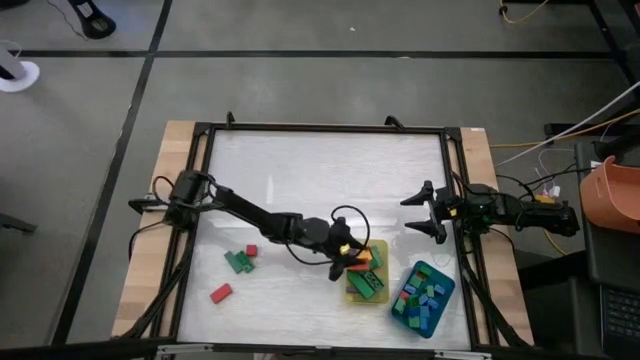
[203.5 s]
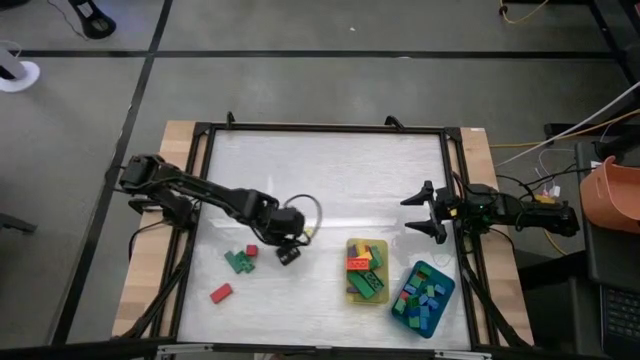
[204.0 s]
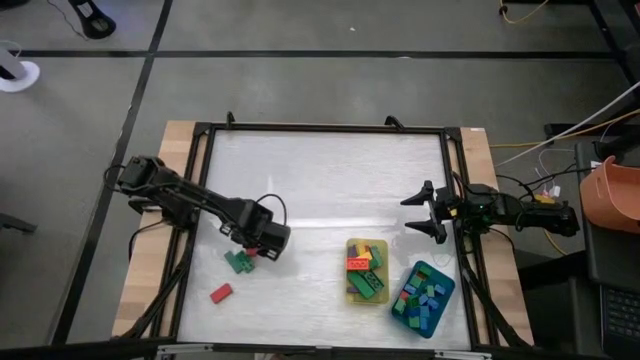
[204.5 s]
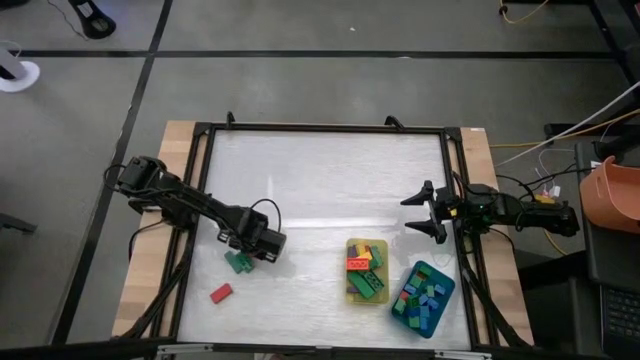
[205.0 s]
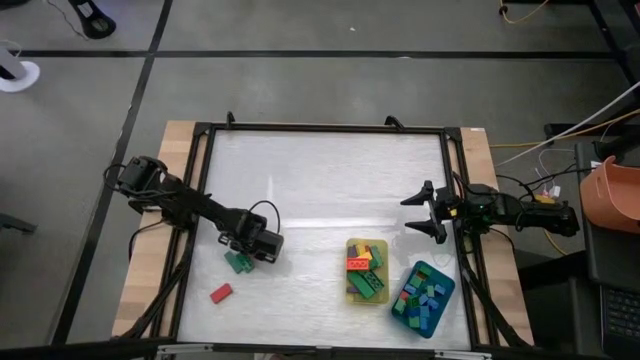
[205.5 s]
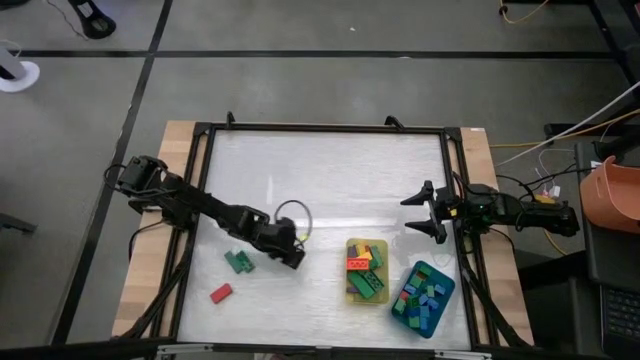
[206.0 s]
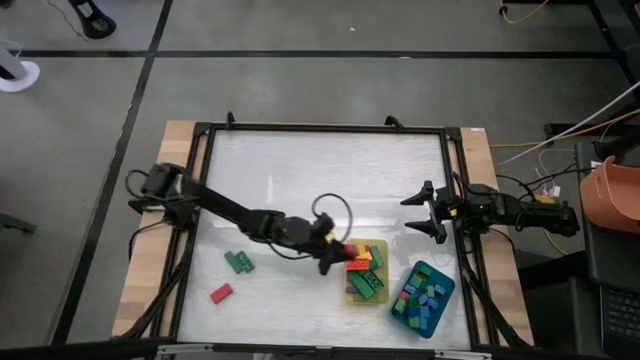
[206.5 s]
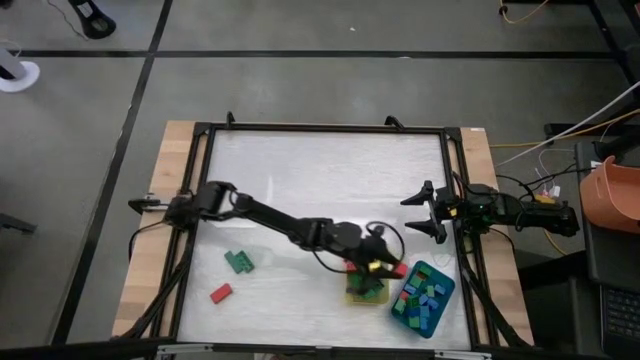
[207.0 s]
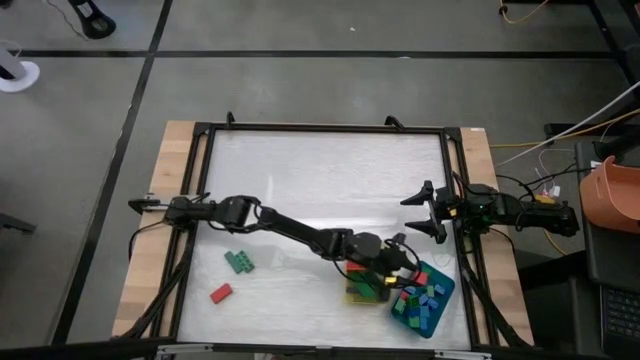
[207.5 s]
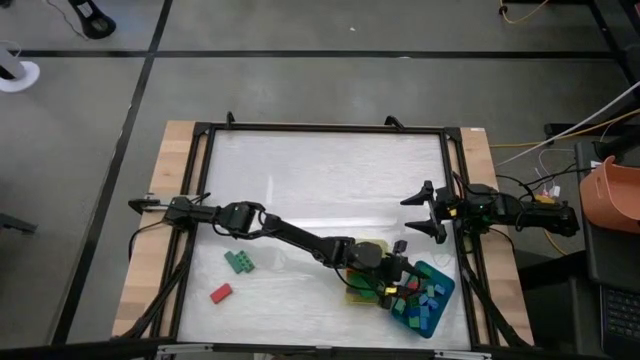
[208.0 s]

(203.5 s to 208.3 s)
Task: Sort blocks by size
Put the small orange block into the blue bin

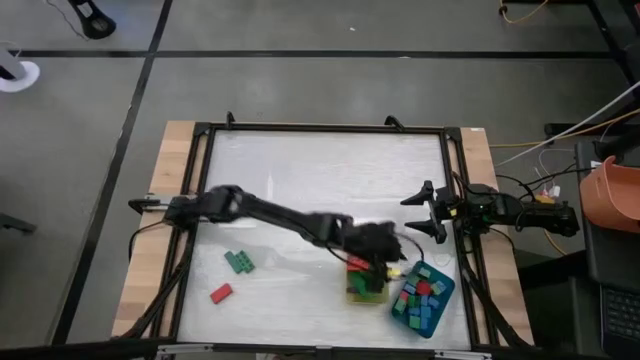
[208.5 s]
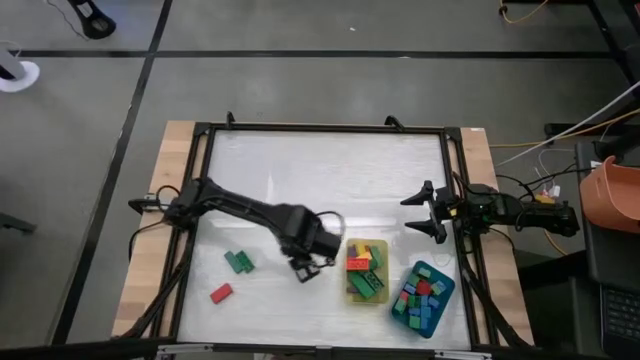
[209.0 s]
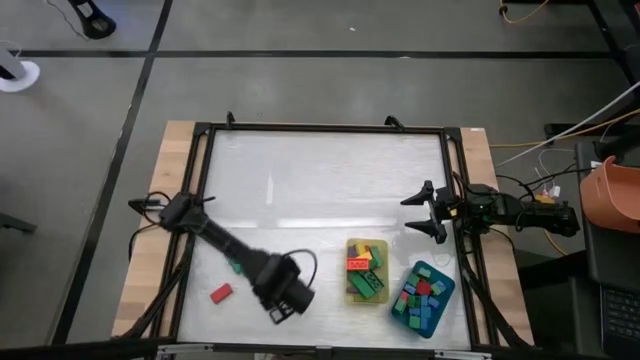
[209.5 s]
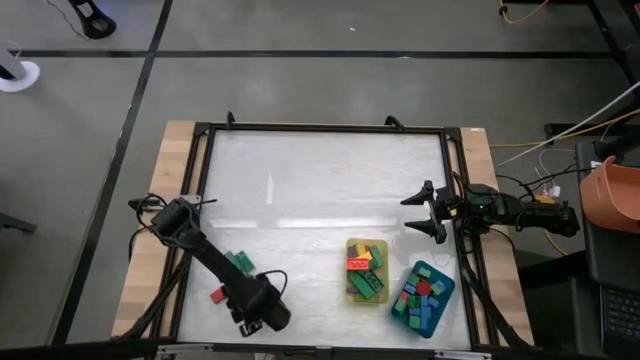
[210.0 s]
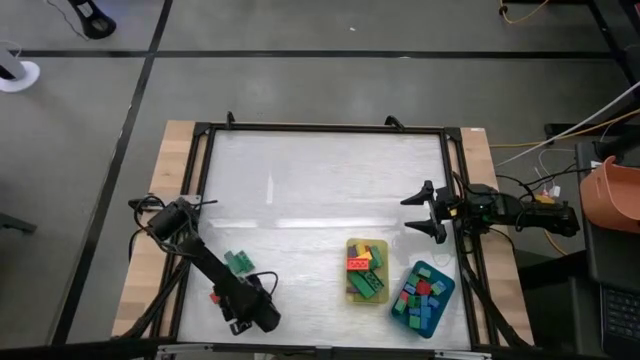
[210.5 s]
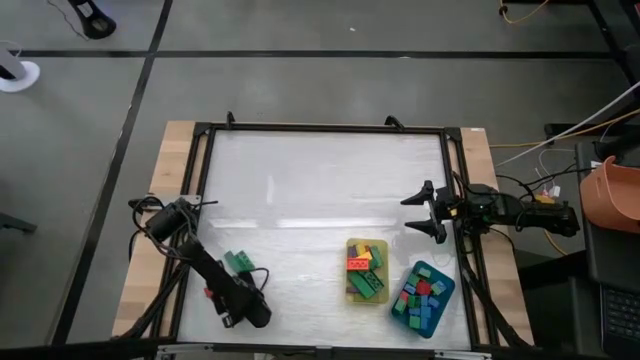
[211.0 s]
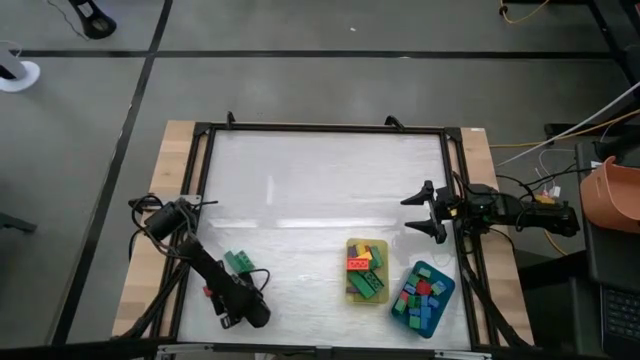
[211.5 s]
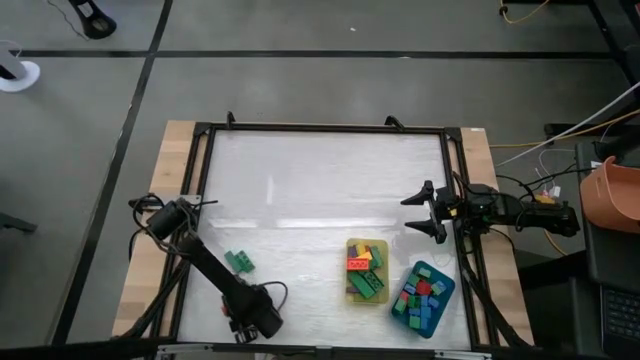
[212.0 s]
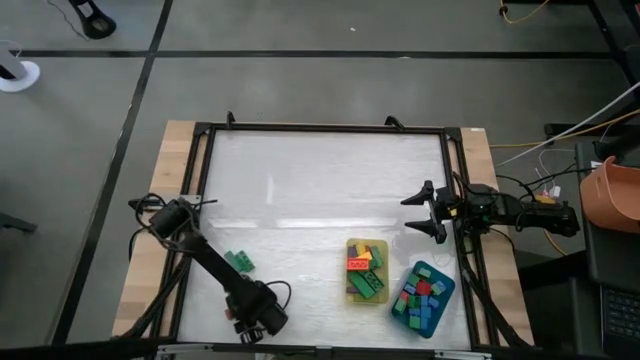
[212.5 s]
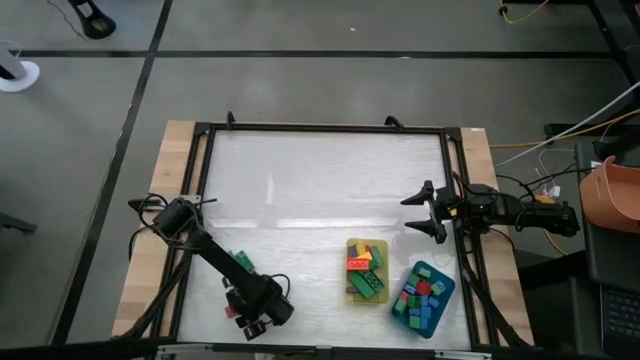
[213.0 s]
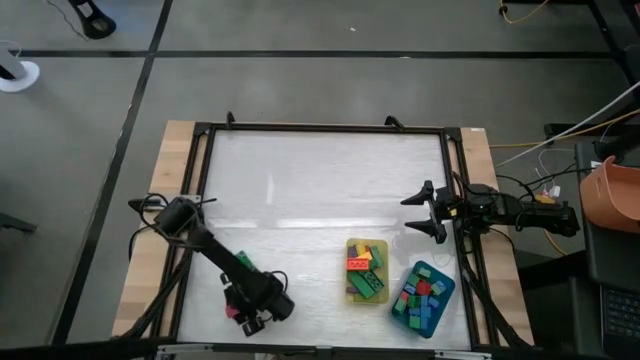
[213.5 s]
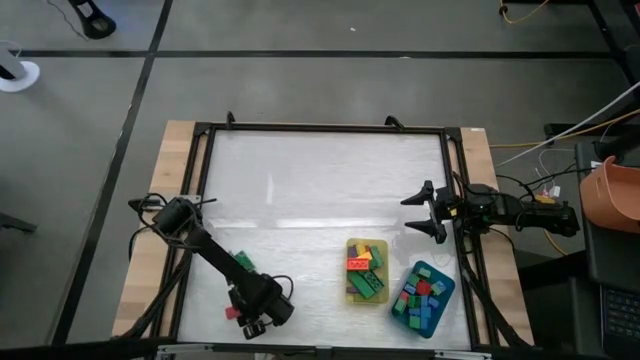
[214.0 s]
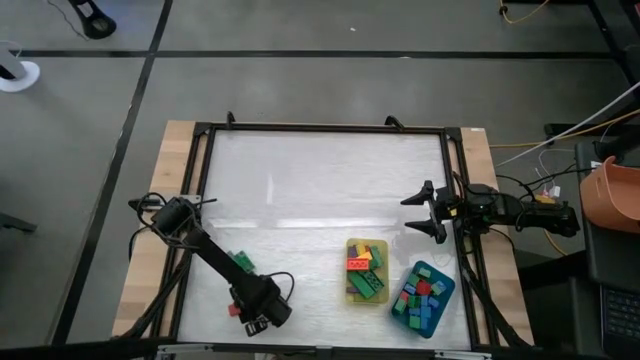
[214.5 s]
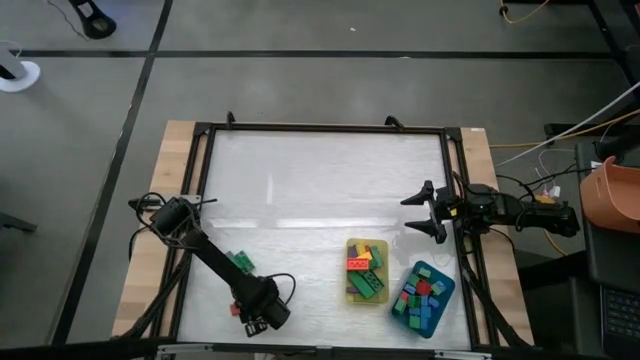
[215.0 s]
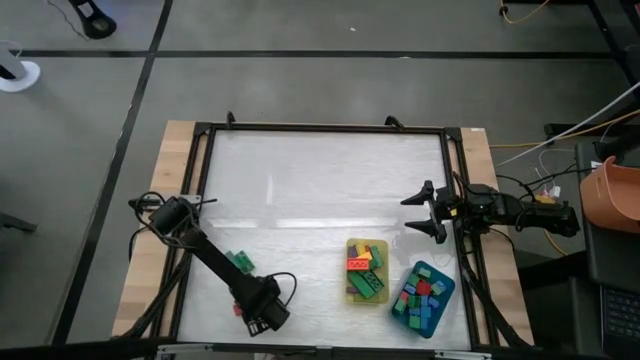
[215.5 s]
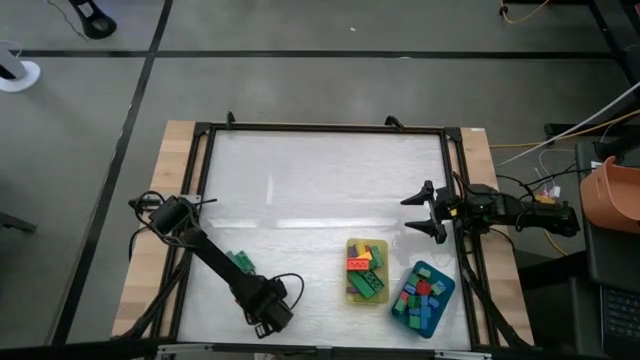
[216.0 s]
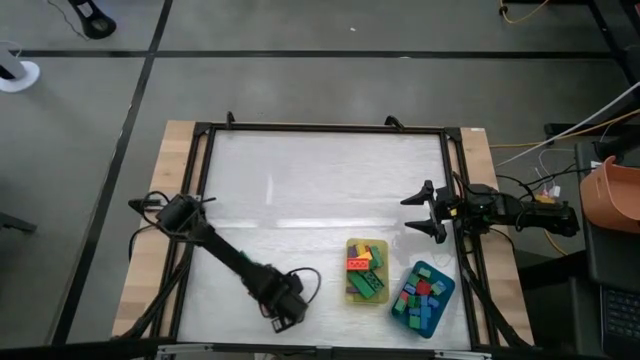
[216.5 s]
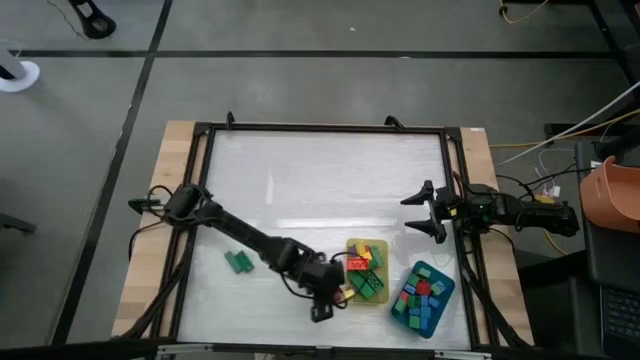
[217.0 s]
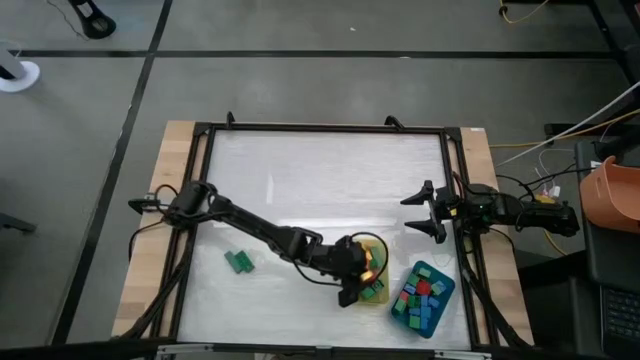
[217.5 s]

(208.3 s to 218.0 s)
Put the long orange block into the yellow bin

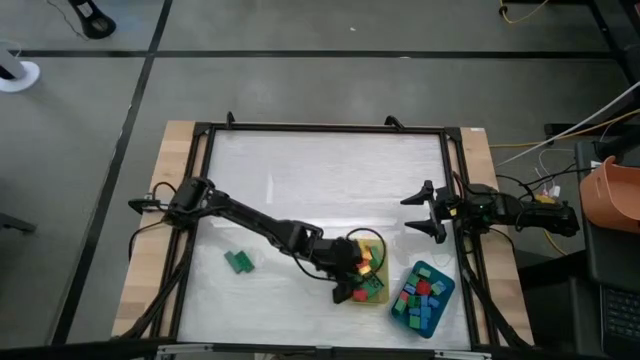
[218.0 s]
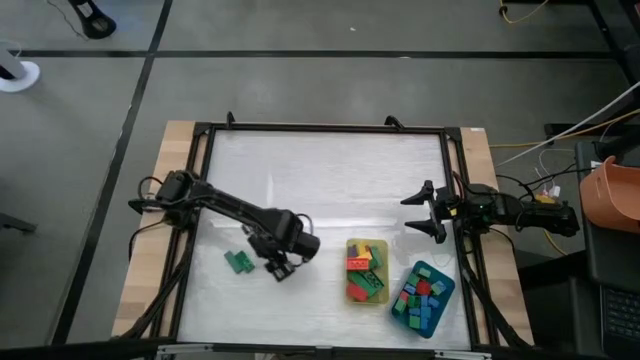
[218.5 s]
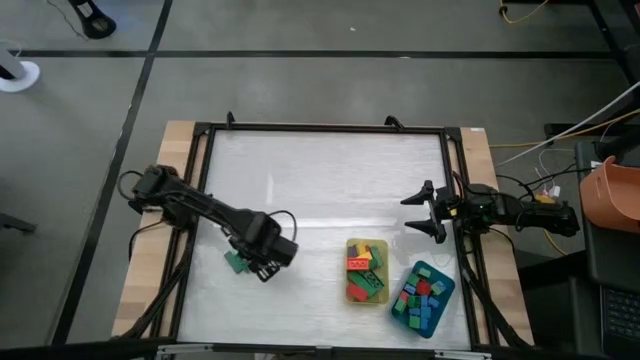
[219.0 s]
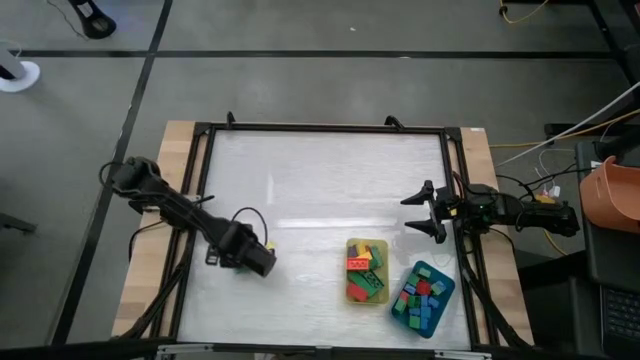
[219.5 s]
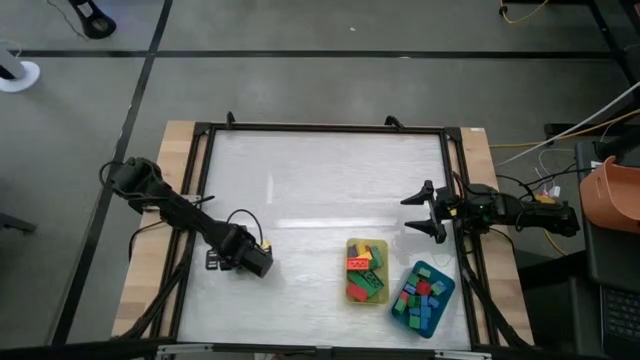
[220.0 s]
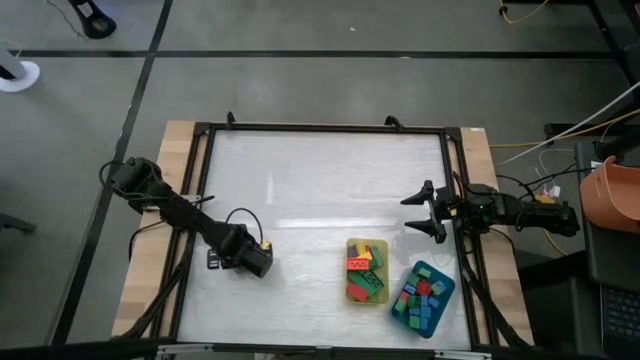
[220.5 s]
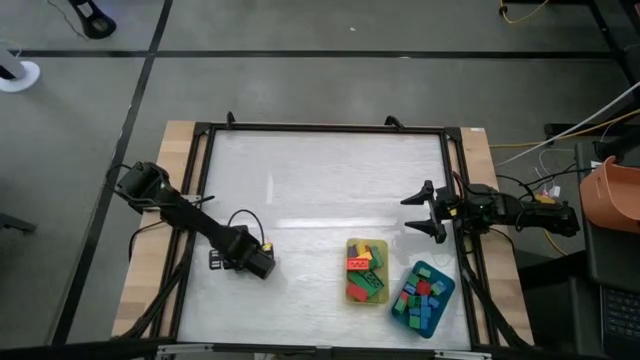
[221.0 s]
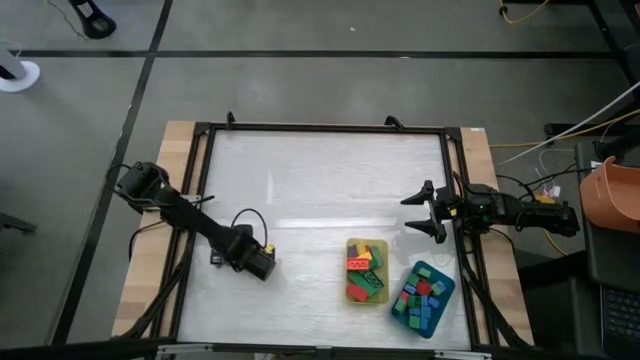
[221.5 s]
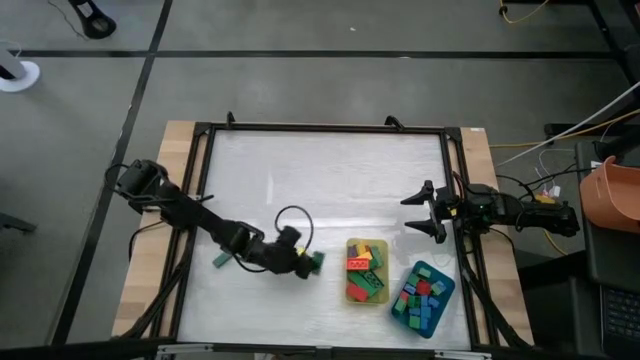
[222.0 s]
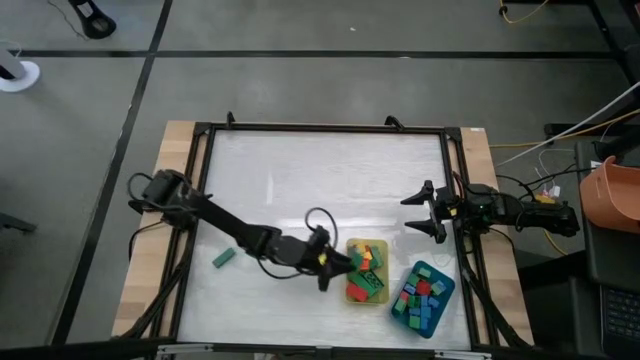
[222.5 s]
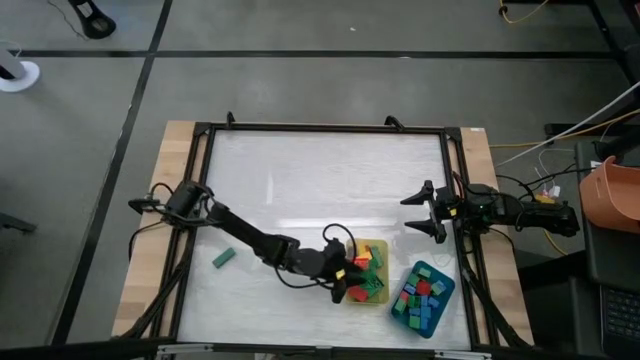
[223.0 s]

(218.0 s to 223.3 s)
Put the long green game piece into the yellow bin

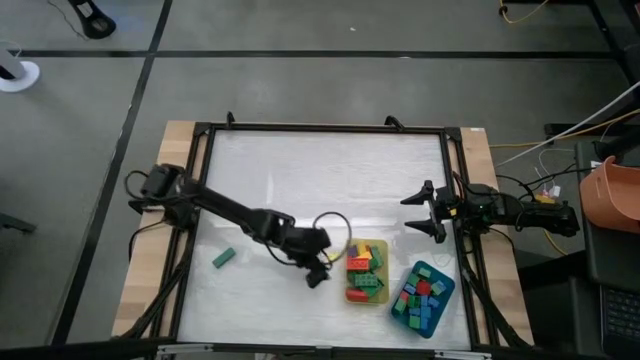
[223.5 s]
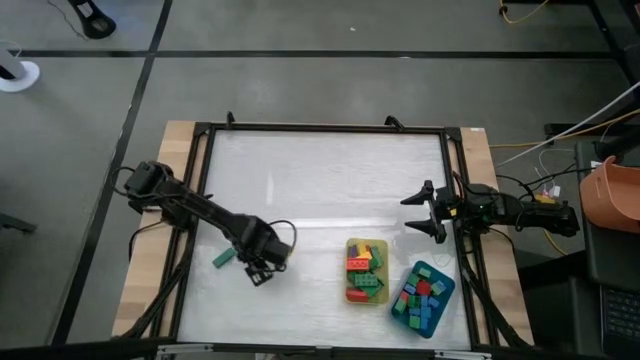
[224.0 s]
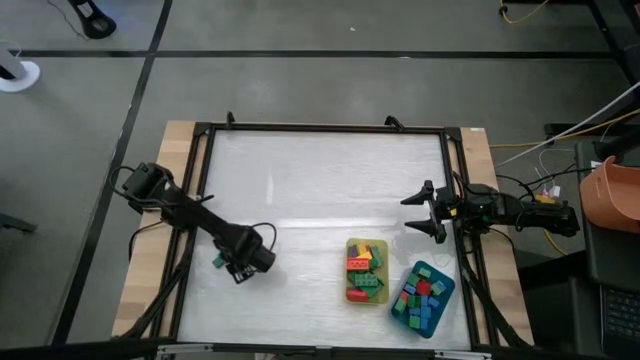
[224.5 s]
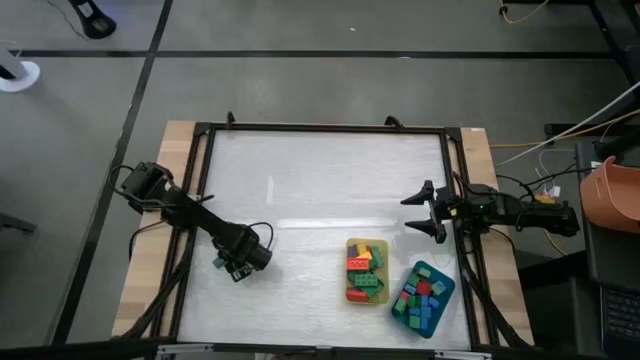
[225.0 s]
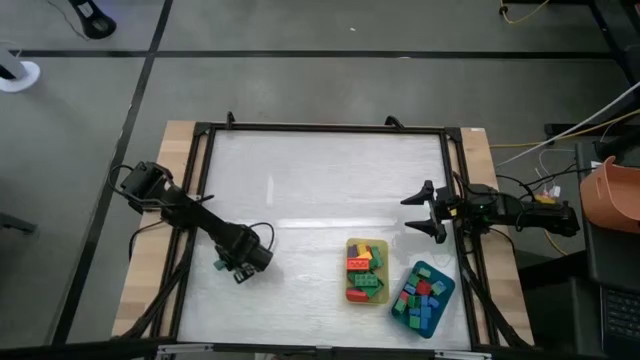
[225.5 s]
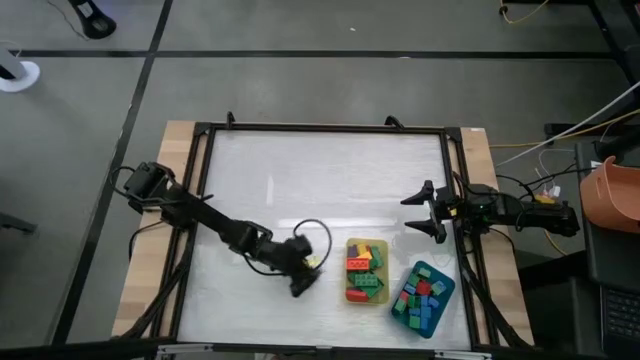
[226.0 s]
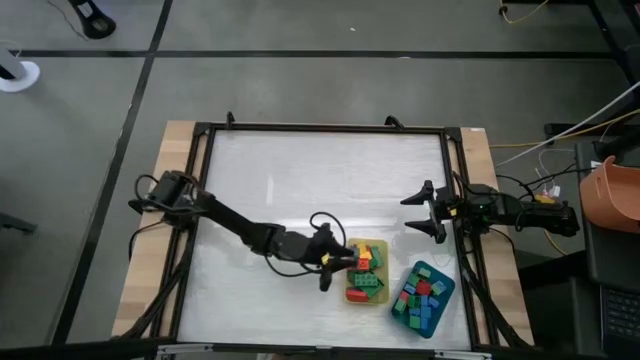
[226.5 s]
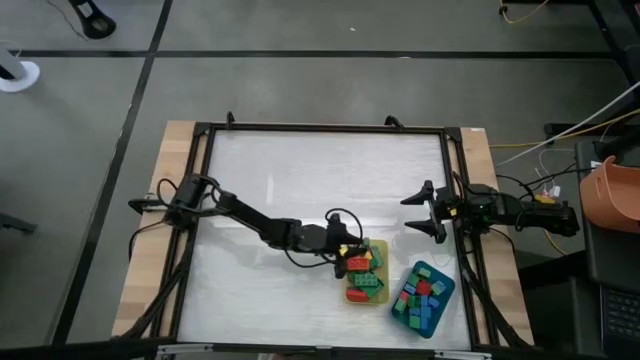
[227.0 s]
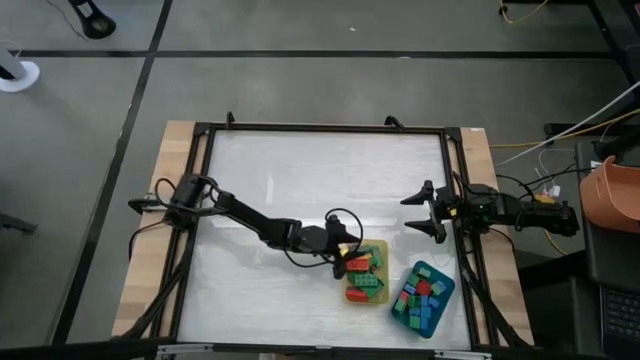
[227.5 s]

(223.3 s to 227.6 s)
Put the long green block into the yellow bin
